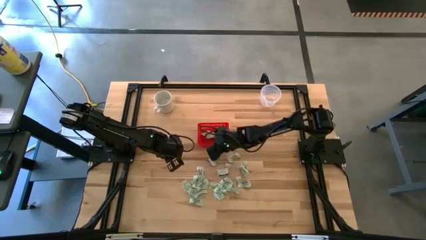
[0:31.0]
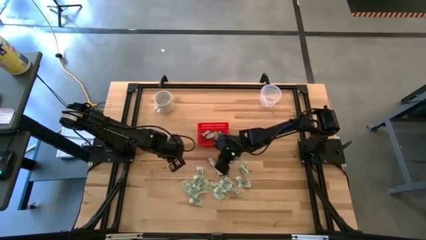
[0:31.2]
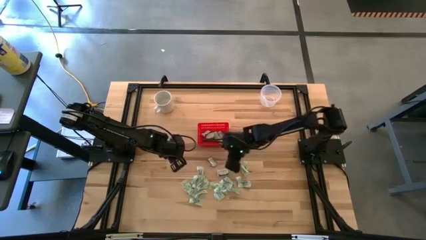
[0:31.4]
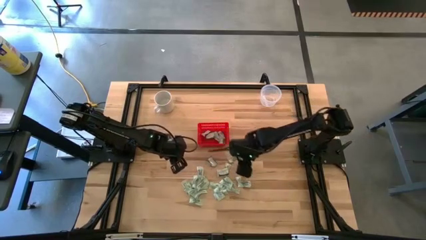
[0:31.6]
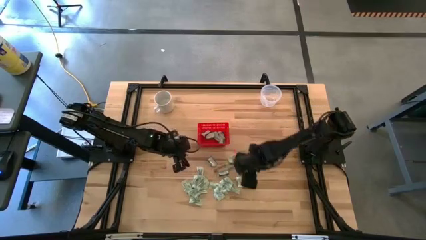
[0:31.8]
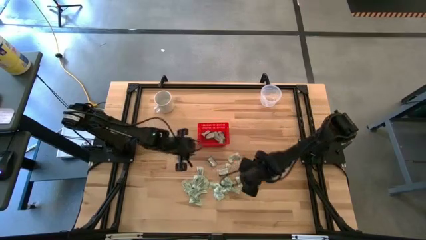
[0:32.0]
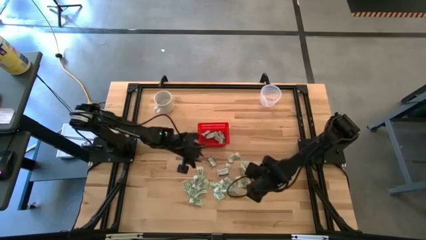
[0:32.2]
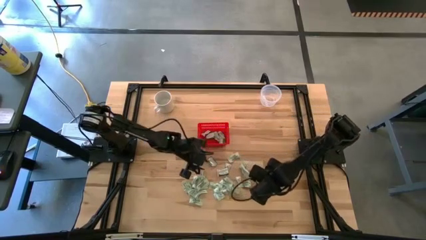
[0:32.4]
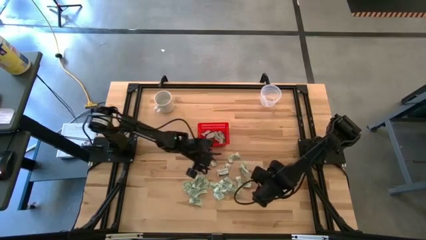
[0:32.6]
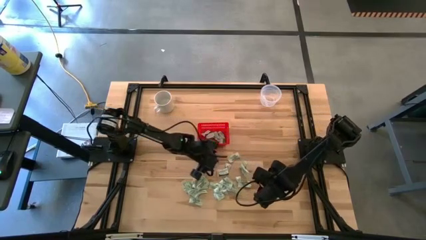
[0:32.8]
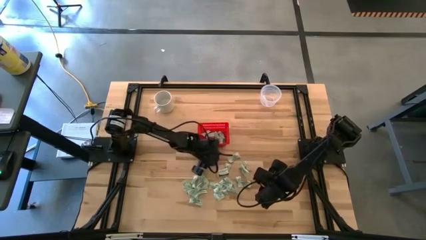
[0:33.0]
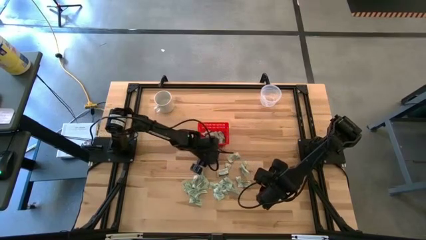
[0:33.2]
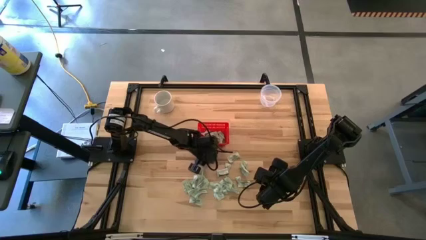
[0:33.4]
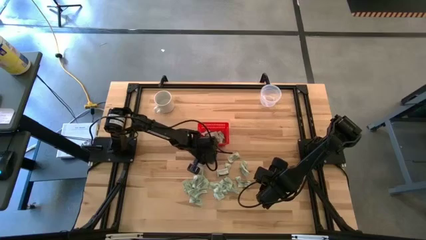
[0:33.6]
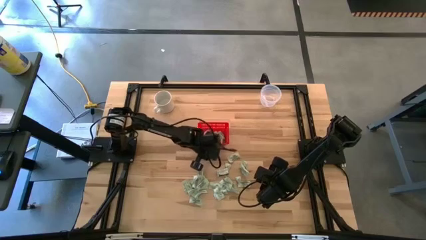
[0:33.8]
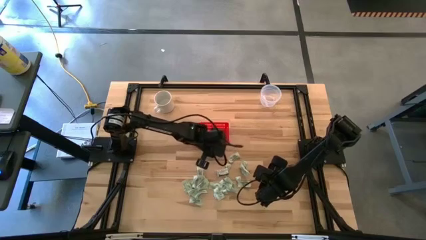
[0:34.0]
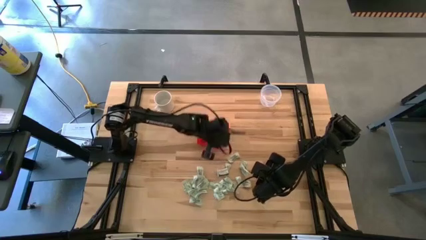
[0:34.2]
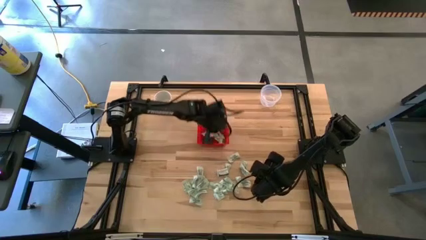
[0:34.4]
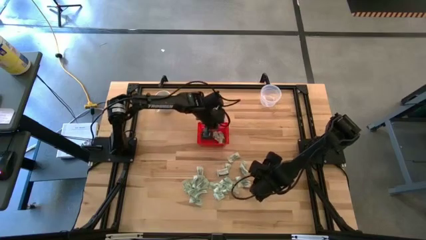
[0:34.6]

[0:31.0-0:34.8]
Task: Pick and place items into bin
Put the truvia packet into the red bin

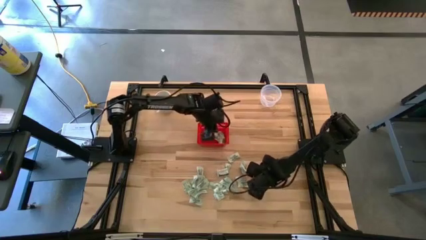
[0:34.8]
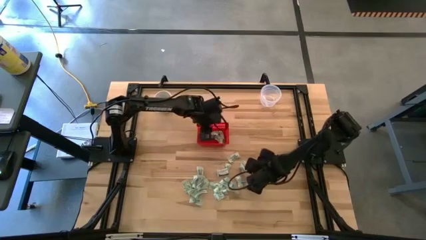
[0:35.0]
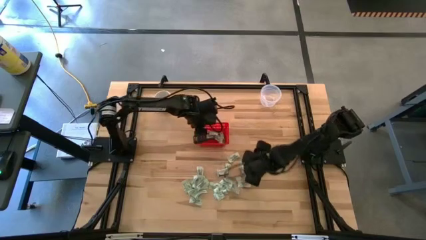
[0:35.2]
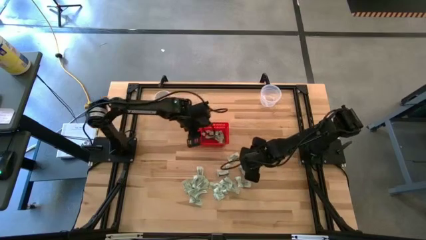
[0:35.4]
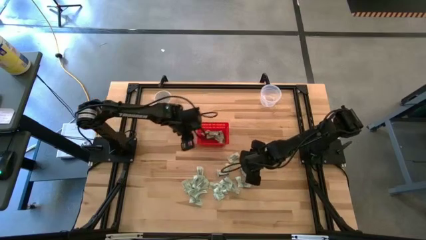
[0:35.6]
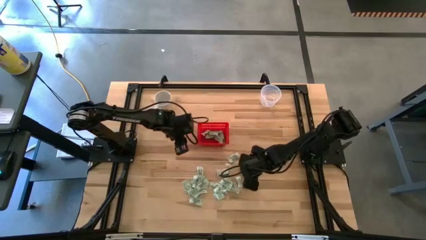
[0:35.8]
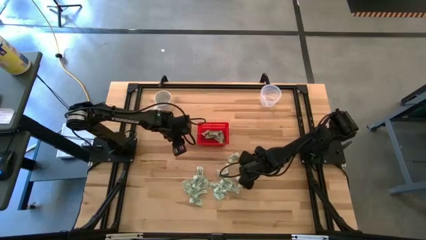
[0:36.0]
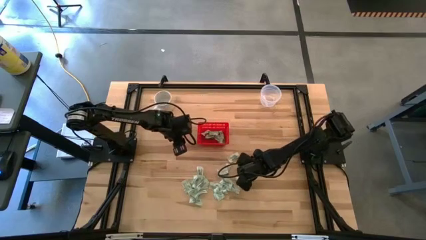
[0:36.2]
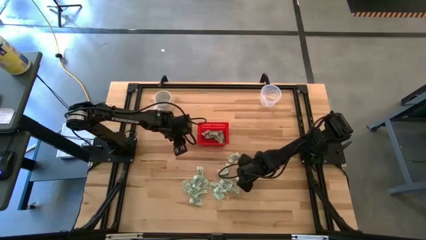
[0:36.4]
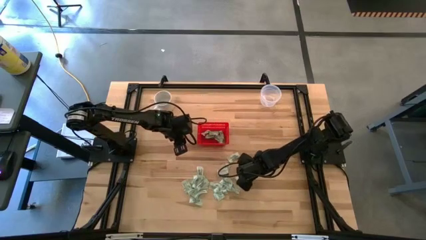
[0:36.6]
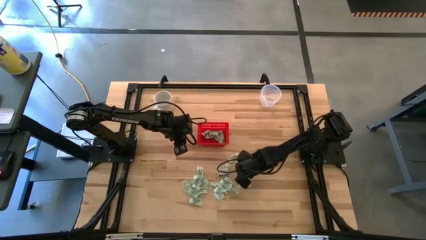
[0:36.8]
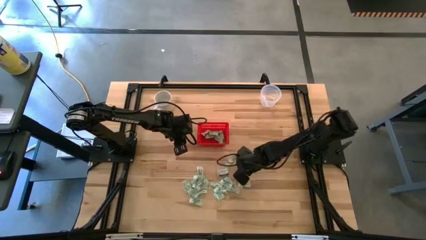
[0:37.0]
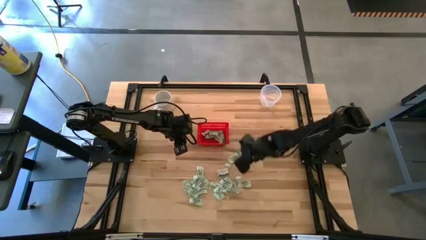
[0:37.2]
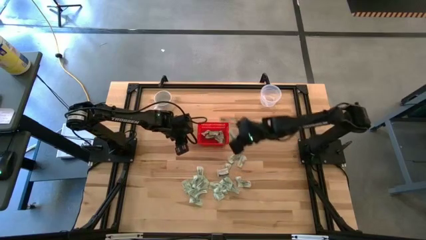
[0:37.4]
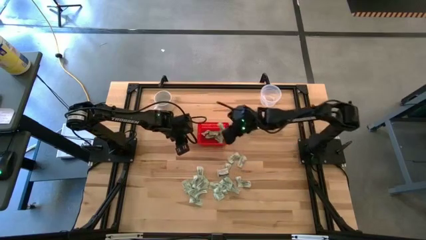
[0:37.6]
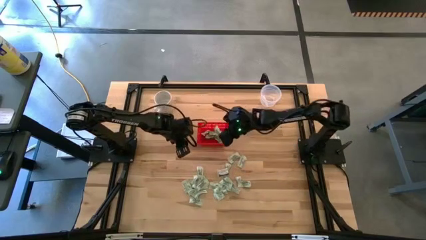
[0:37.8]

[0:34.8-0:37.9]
Put the stevia packet into the red bin

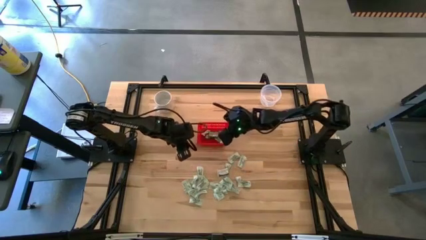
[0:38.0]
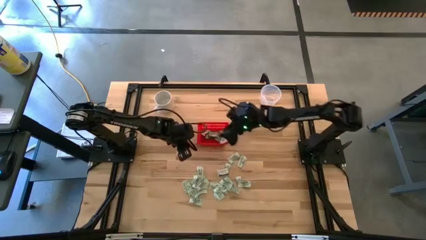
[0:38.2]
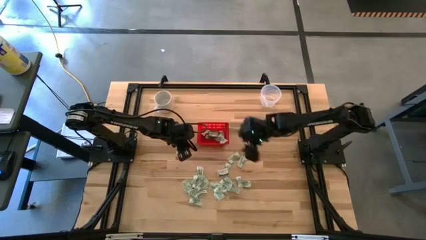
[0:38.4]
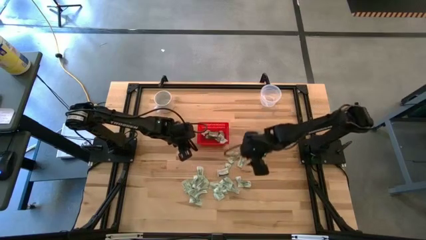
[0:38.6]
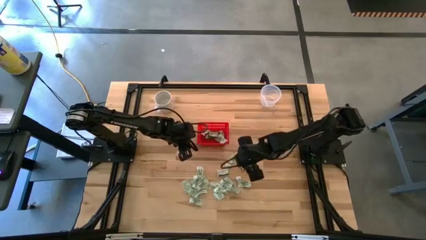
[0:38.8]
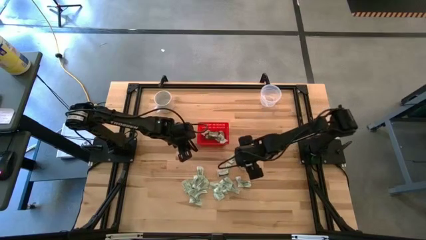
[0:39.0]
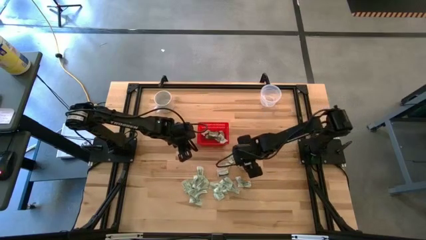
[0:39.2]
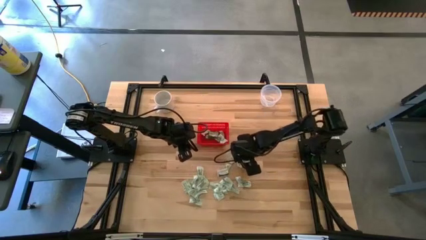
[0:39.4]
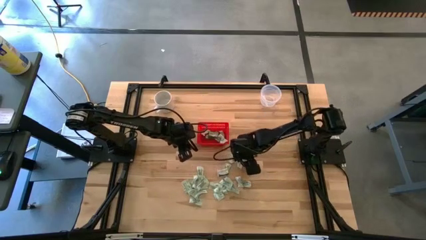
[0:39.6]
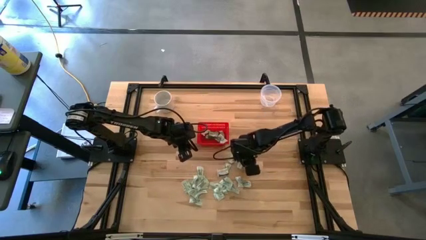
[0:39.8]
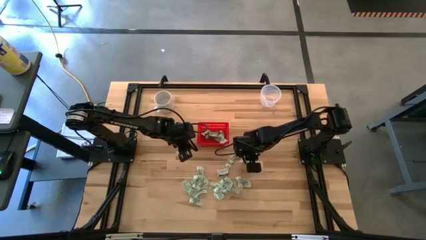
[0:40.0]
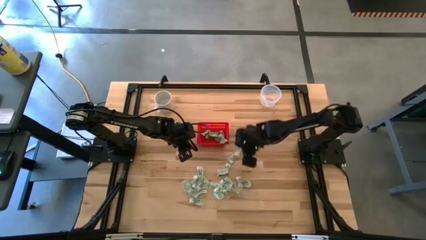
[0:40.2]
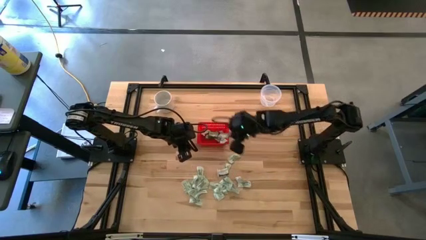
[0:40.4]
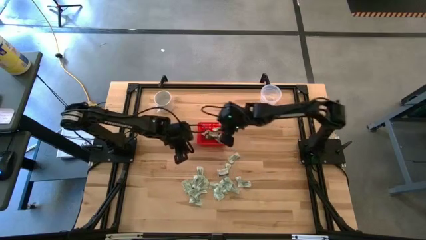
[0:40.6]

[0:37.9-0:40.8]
Put the stevia packet into the red bin

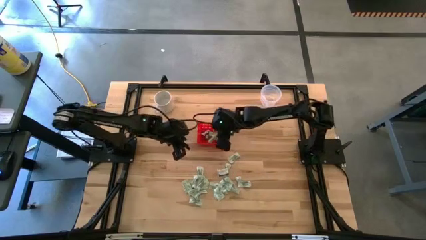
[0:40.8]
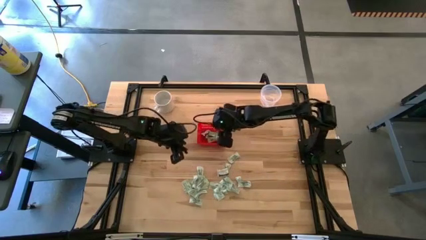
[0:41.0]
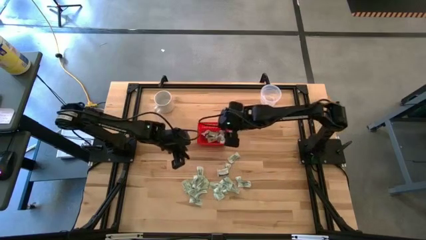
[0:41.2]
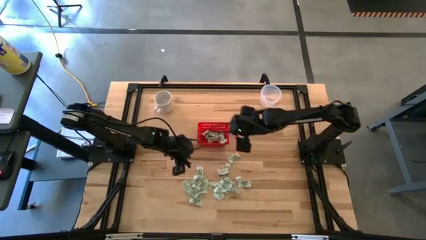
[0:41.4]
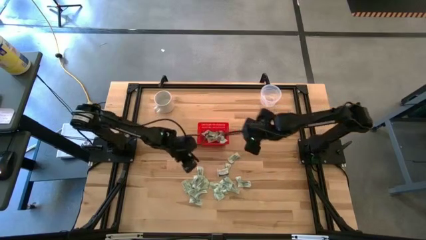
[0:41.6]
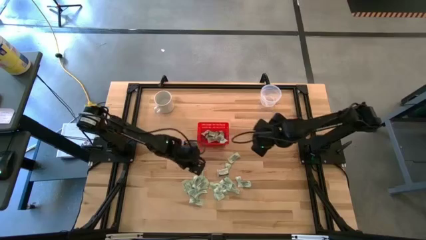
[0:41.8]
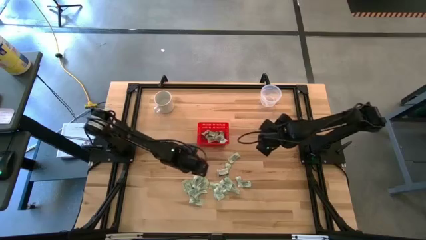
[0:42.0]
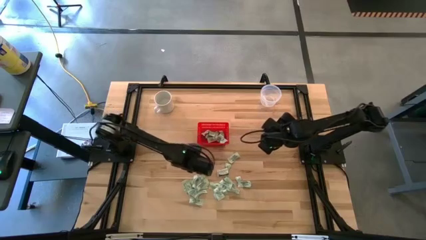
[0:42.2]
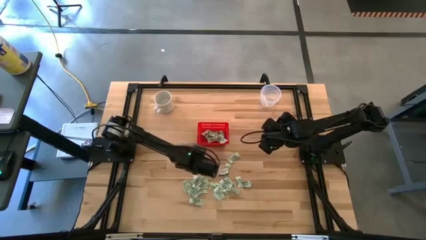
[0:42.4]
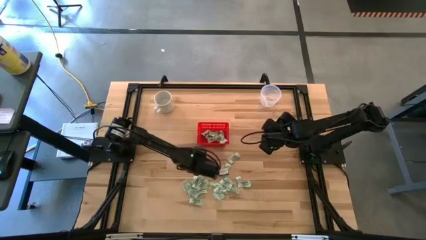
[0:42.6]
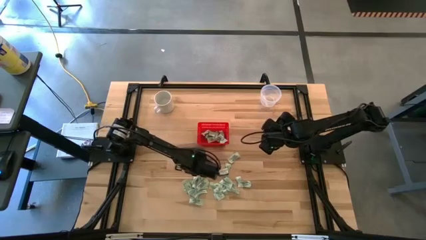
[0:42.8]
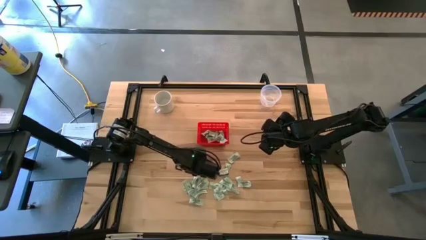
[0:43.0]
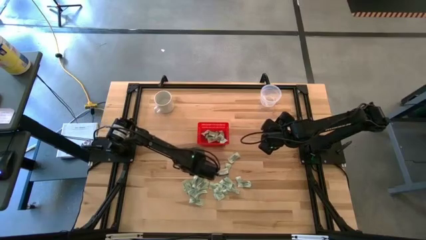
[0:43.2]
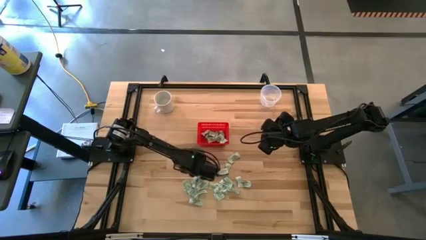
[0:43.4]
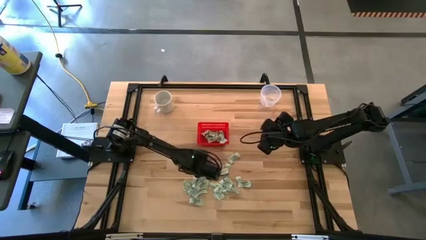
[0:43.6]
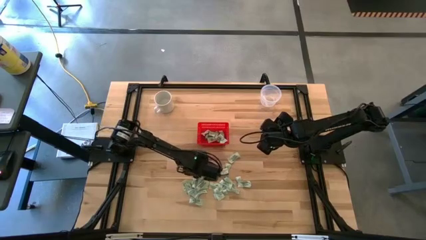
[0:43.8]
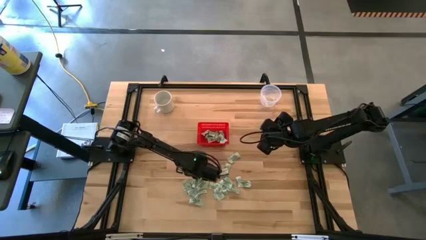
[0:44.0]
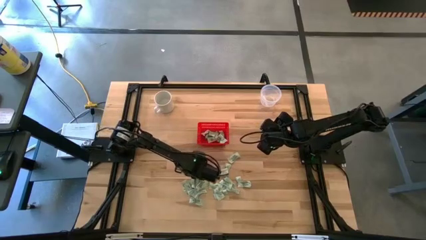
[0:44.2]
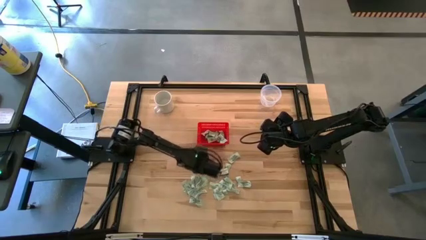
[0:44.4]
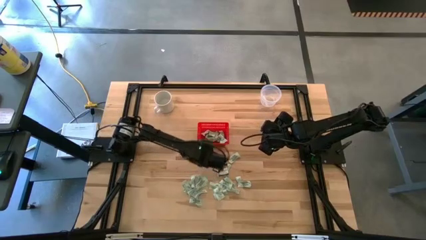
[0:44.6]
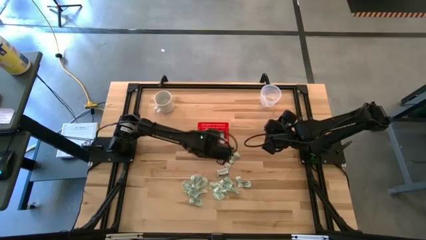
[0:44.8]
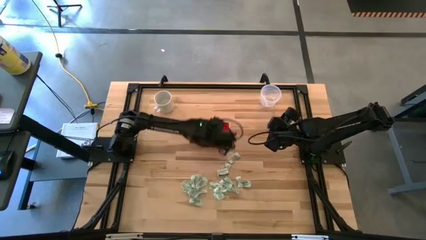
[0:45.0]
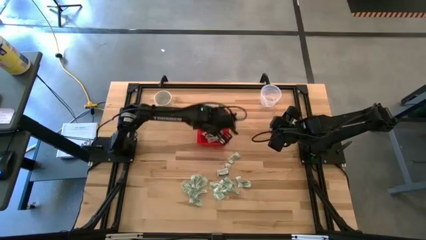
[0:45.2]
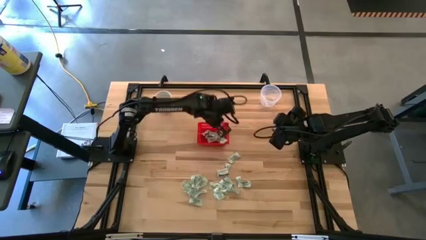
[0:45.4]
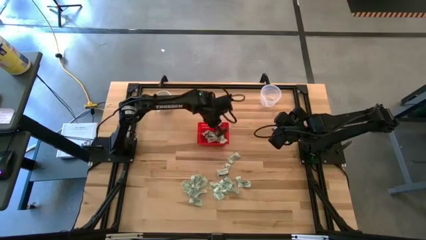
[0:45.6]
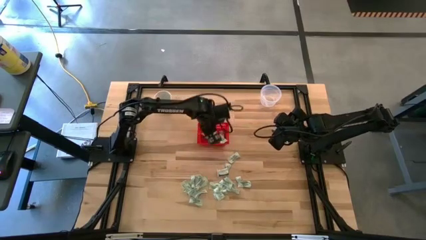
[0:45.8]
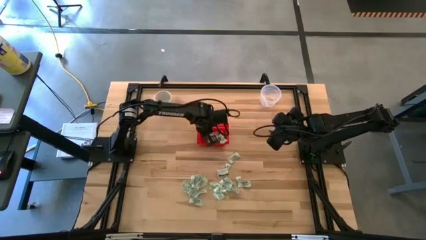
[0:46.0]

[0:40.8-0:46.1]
Put the stevia packet into the red bin

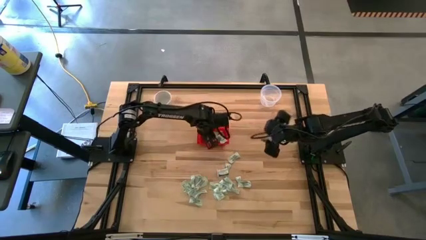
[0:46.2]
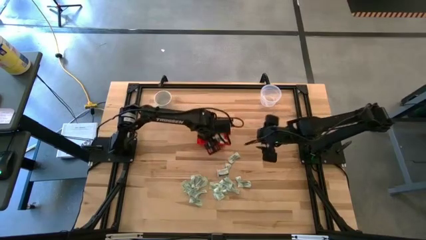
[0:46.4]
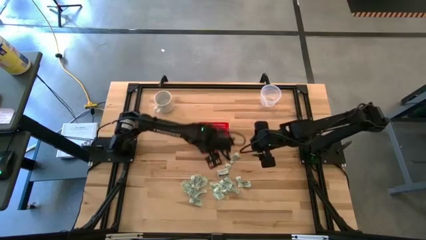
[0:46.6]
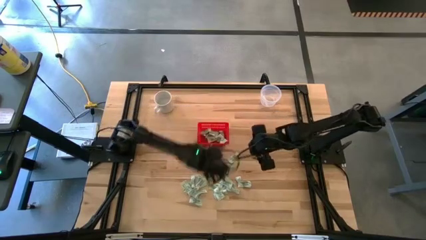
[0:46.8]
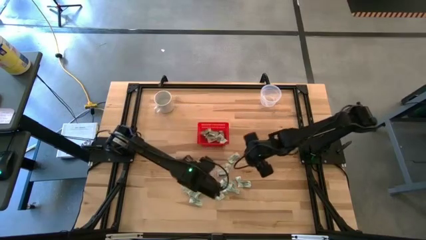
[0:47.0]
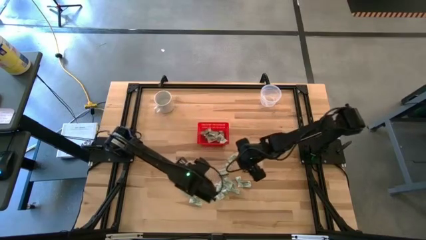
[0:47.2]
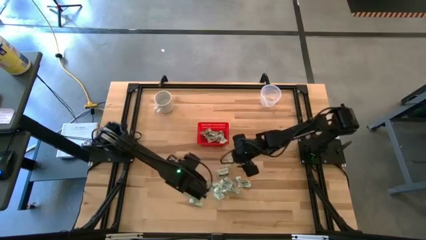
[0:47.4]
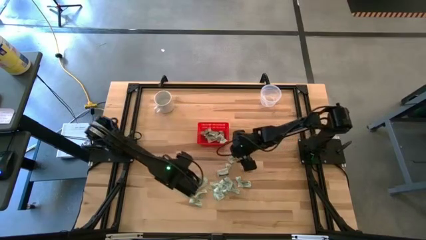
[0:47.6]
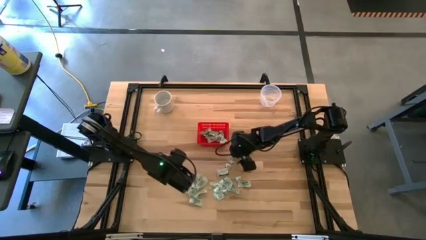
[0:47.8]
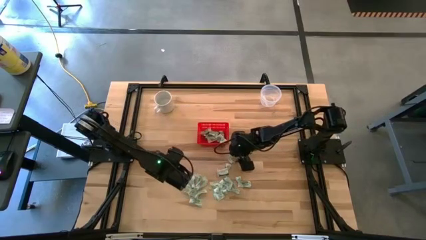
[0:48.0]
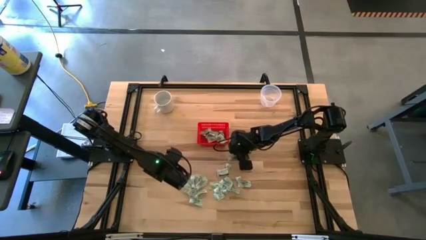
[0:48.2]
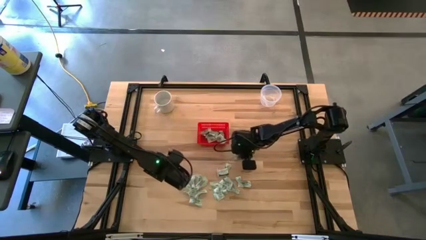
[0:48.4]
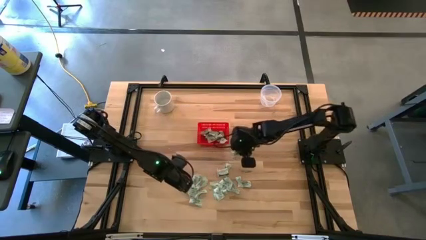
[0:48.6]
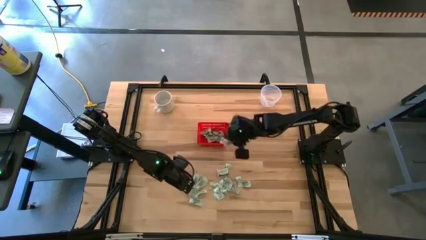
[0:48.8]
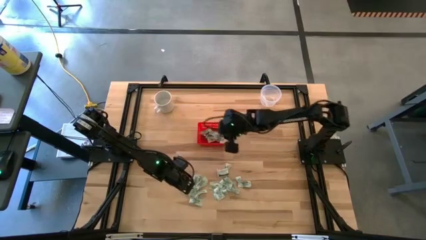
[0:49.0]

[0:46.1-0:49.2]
Put the stevia packet into the red bin
